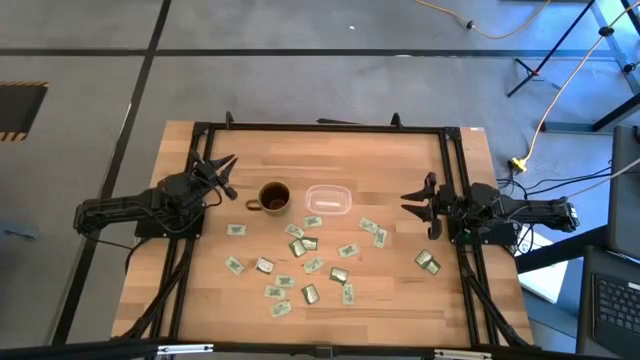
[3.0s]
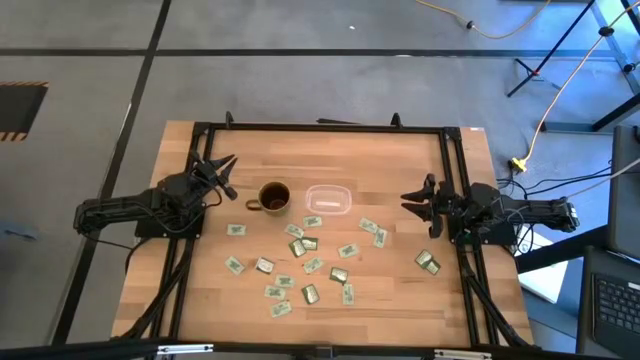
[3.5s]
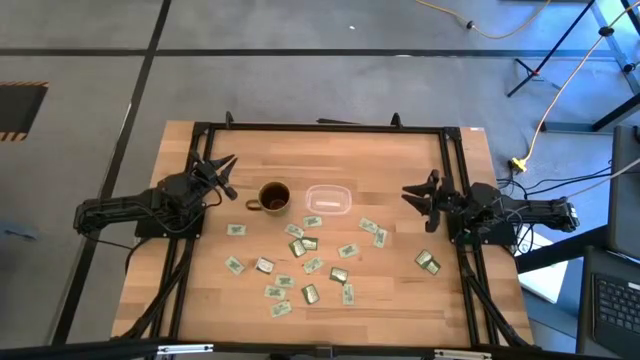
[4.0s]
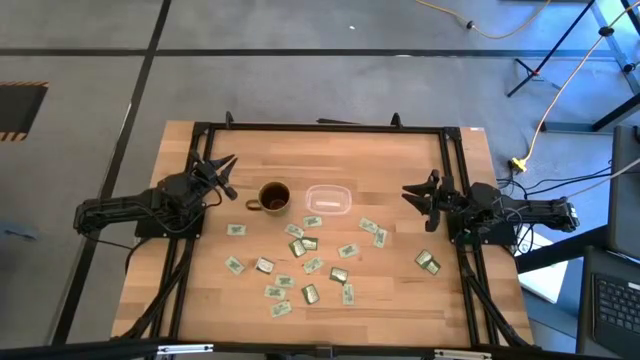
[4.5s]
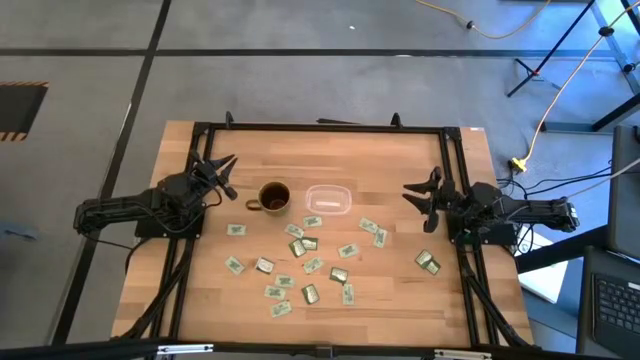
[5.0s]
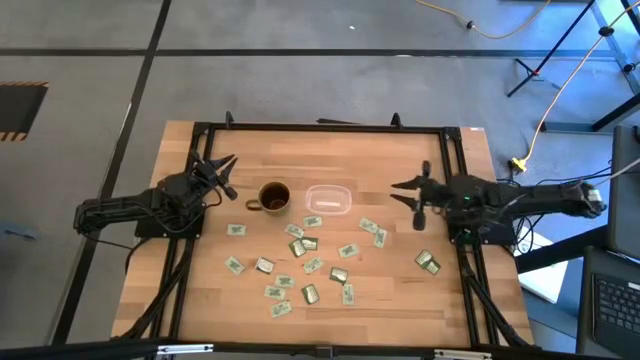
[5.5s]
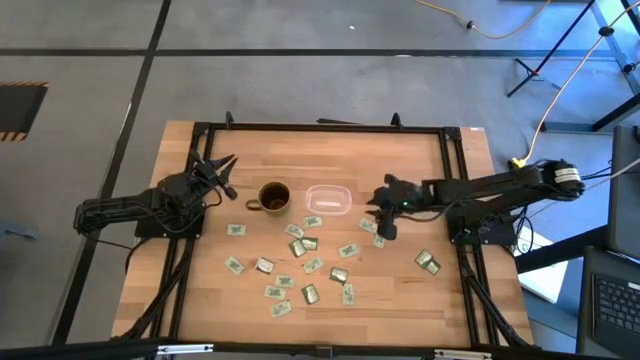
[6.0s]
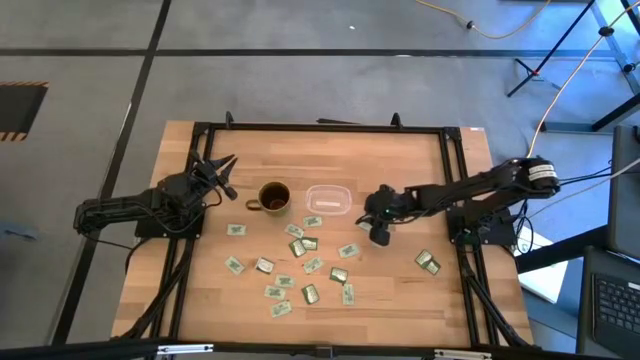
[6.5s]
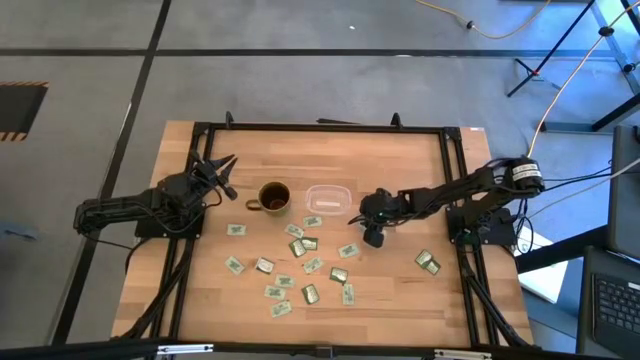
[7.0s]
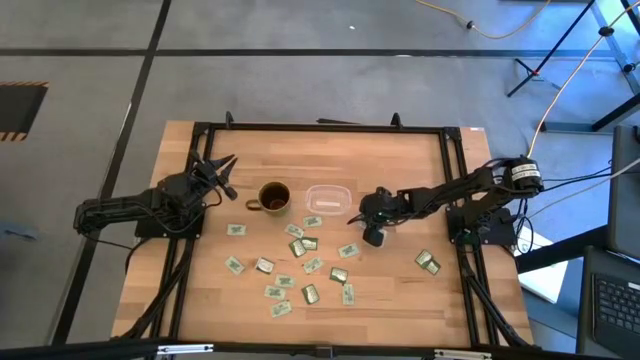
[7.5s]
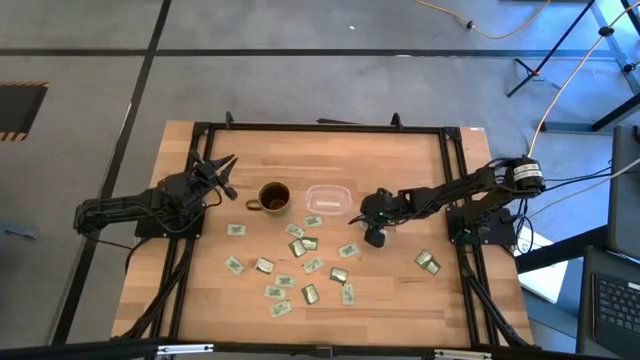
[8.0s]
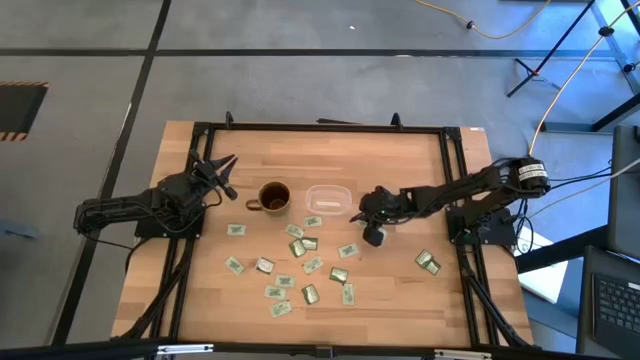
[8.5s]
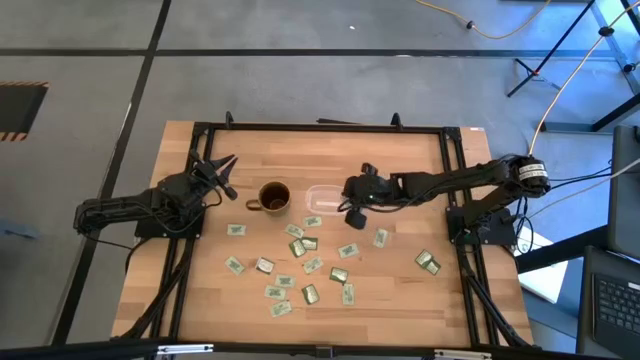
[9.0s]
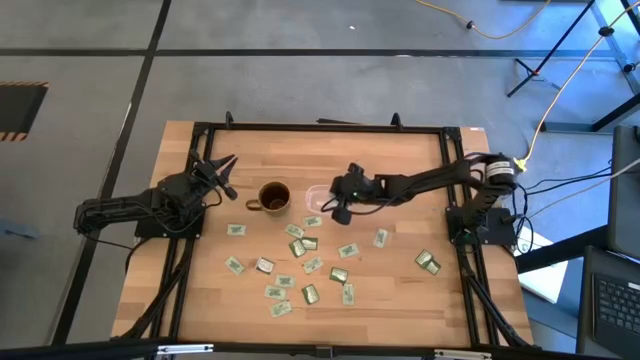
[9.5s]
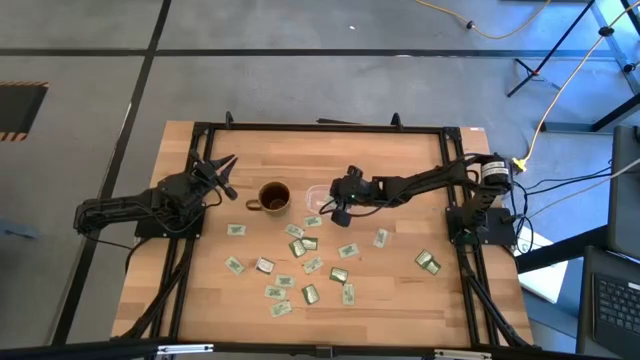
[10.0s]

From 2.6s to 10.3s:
Task: Pick and place items into bin
Put the light green stevia pack into the transparent bin

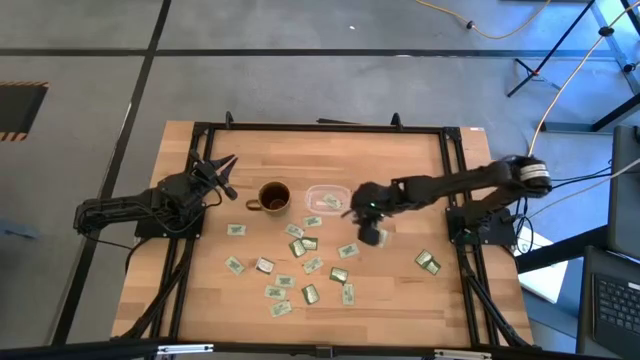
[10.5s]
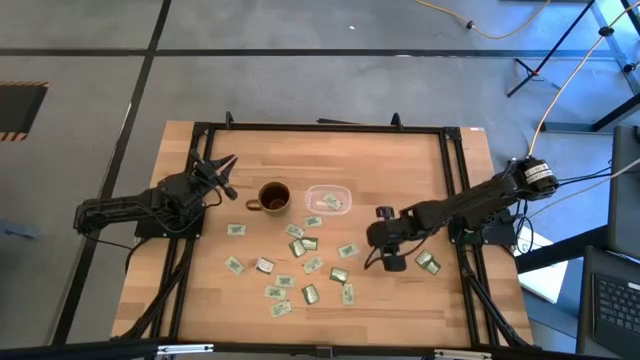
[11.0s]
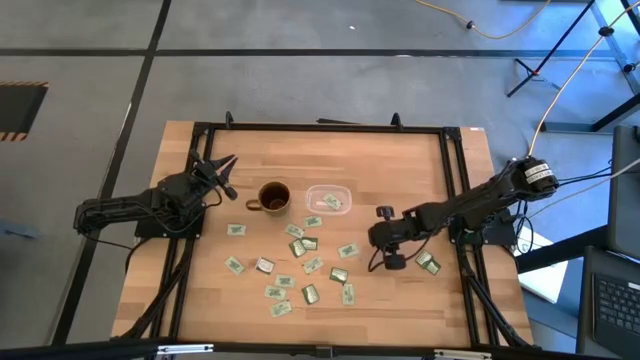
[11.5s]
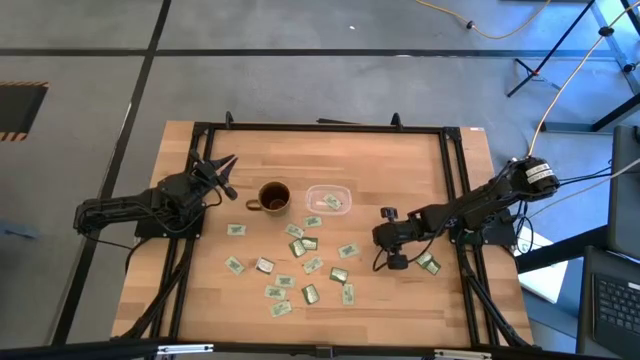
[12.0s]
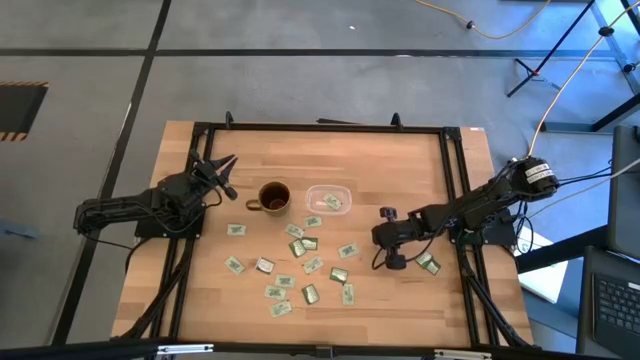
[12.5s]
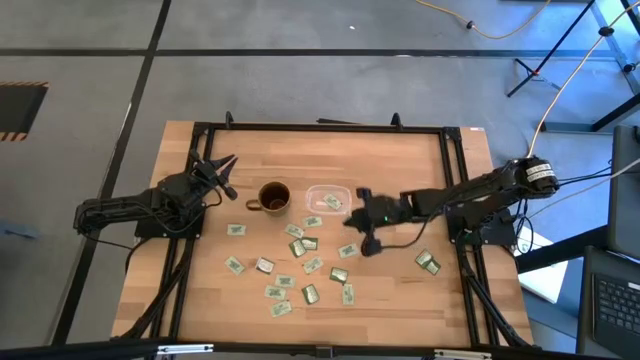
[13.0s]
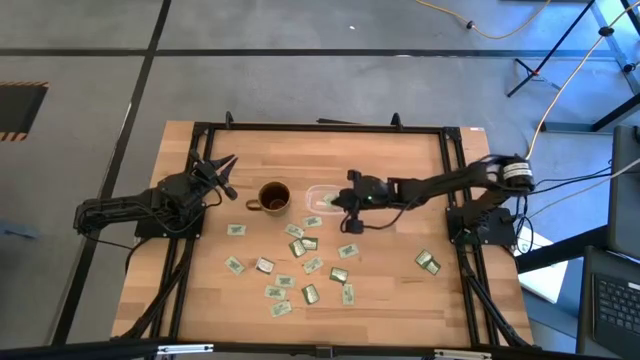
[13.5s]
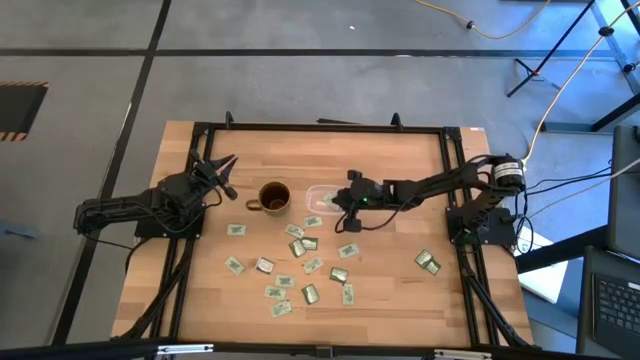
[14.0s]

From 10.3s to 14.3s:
Put the light green stevia pack into the transparent bin

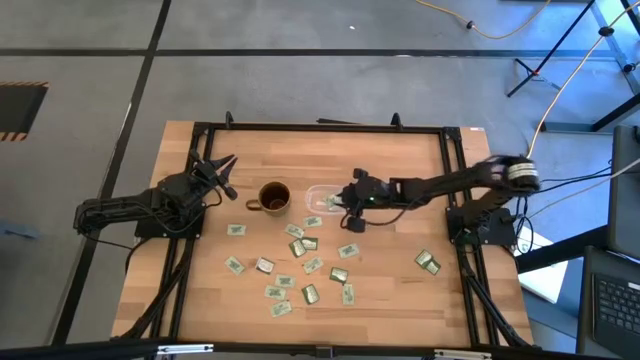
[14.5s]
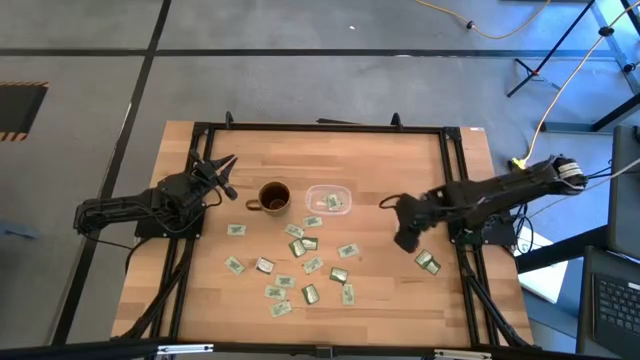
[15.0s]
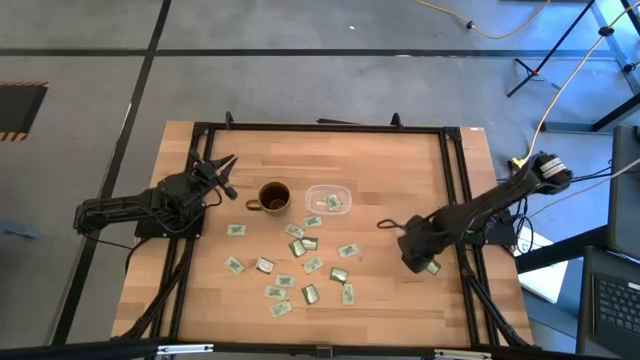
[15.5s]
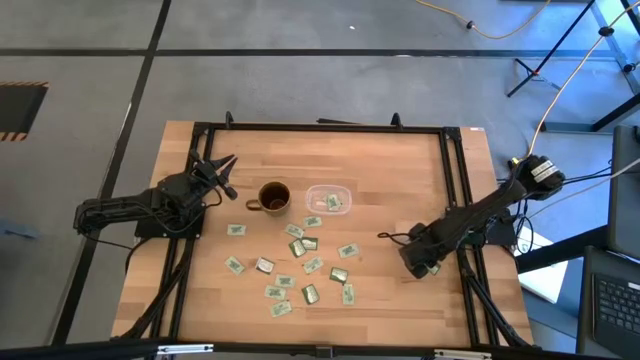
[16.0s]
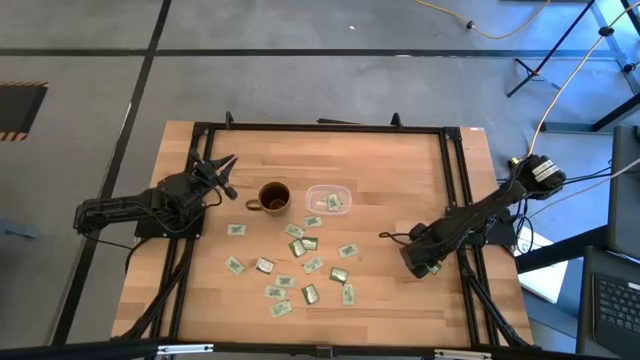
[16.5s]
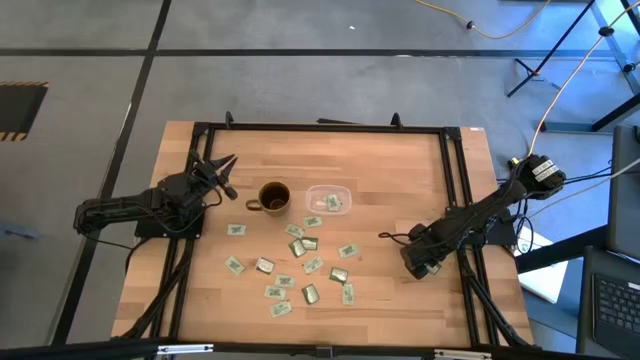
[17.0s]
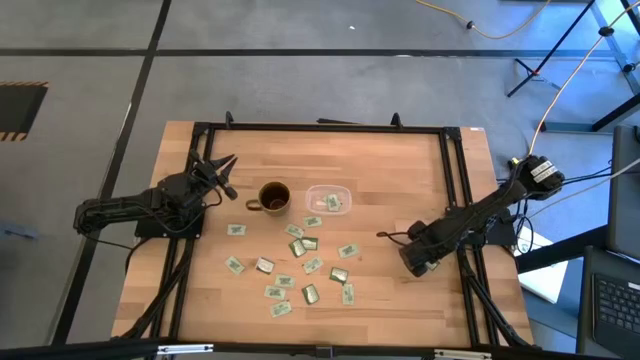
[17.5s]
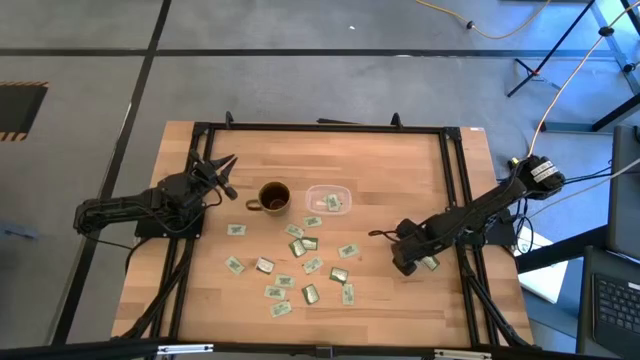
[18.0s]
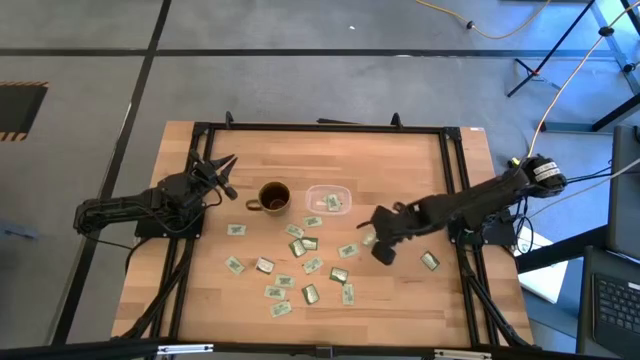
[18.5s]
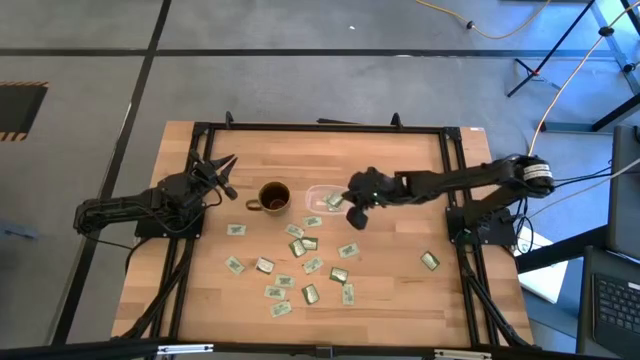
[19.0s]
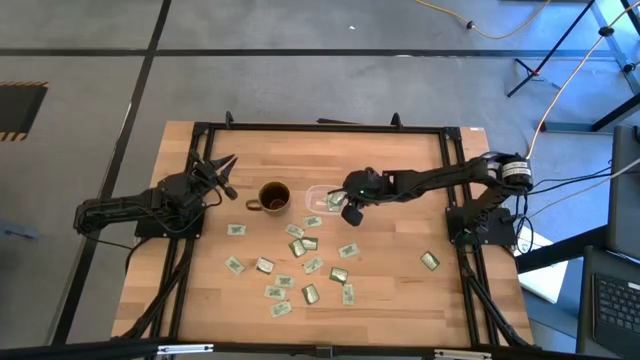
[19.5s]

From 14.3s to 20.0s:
Put the green truvia pack into the transparent bin

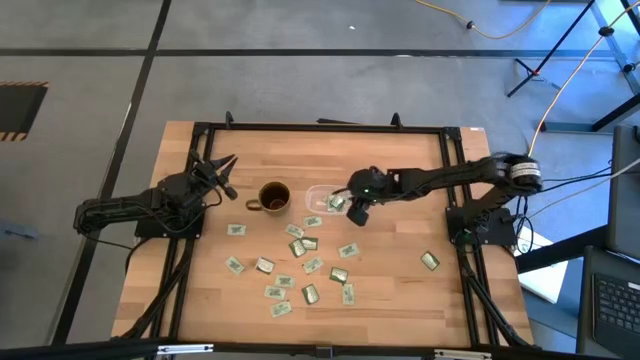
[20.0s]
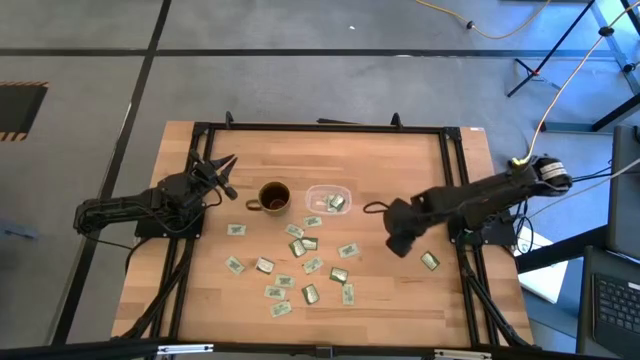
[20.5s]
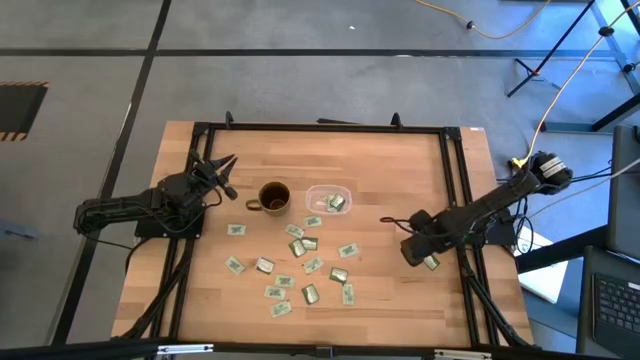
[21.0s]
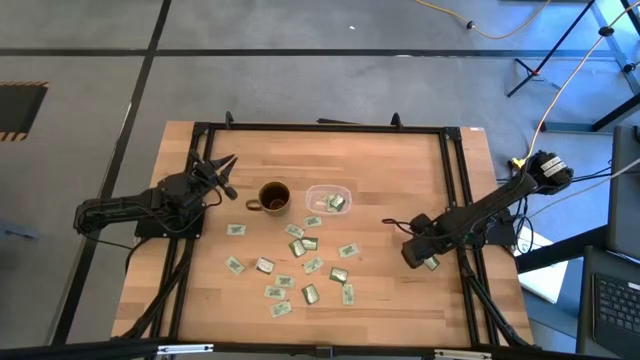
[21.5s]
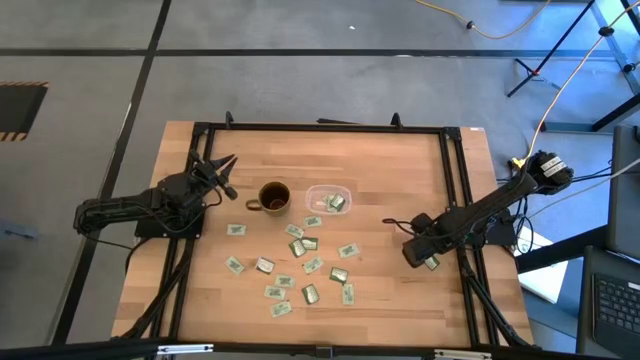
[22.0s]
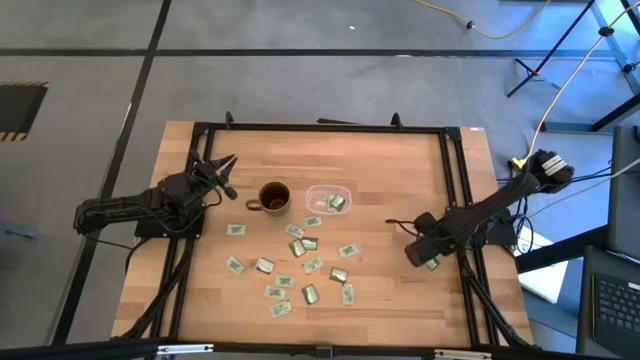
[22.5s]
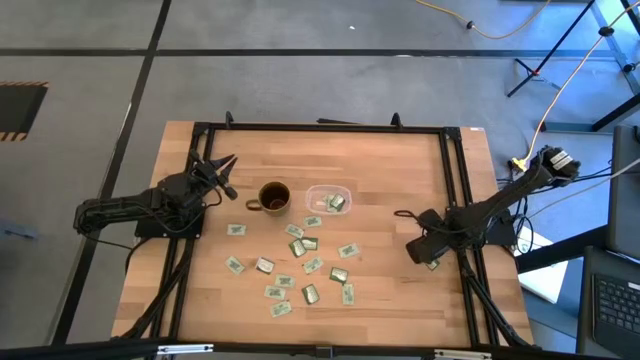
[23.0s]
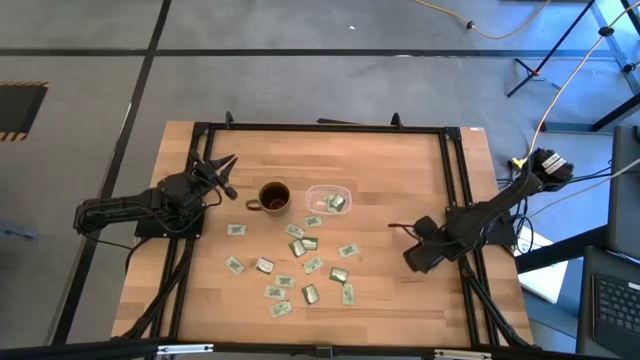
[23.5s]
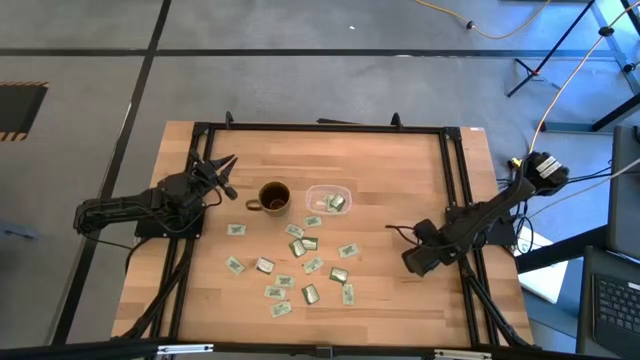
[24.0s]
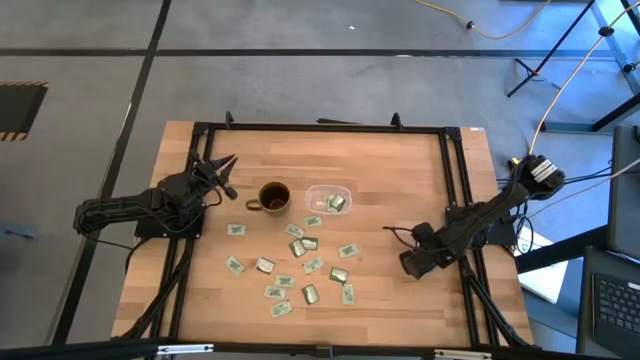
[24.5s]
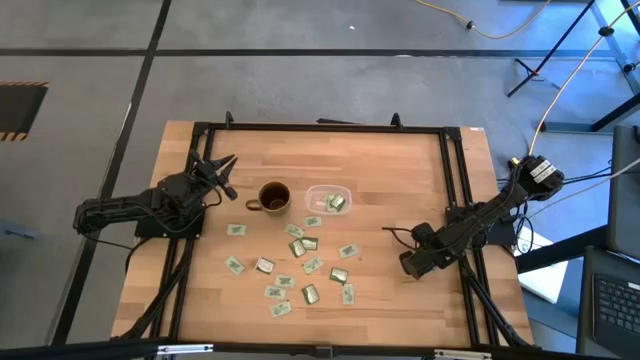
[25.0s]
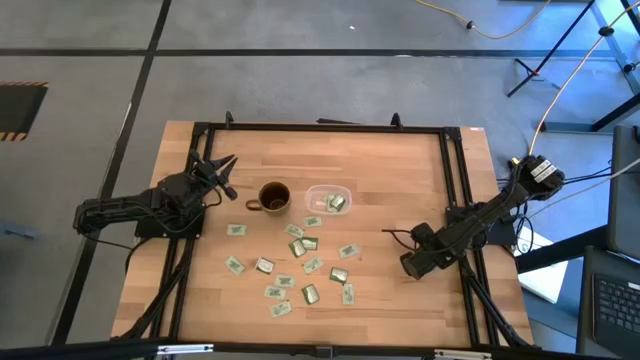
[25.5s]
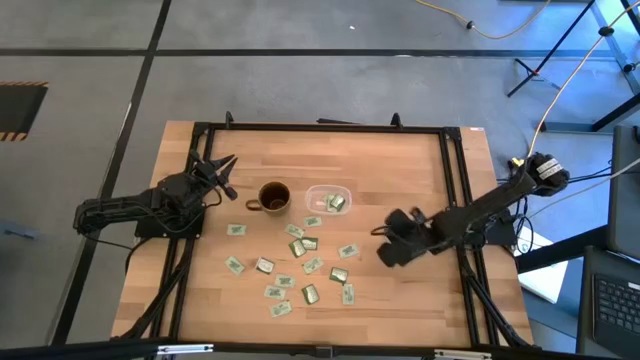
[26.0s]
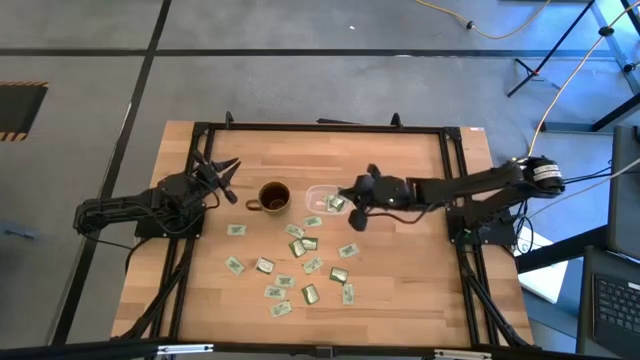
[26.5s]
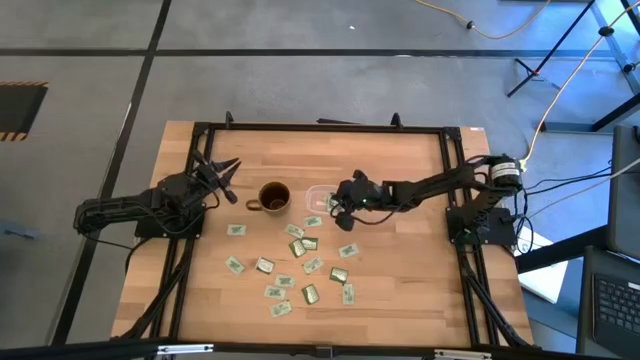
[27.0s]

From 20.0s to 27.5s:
Put the green truvia pack into the transparent bin
